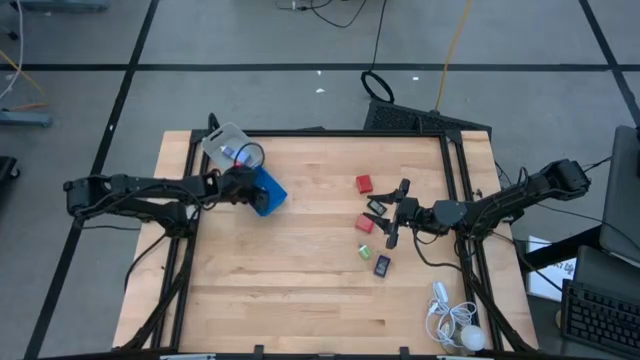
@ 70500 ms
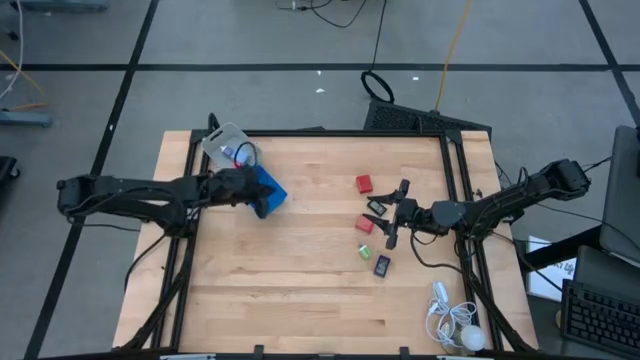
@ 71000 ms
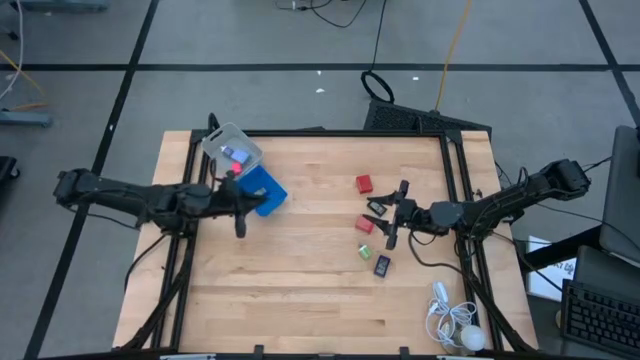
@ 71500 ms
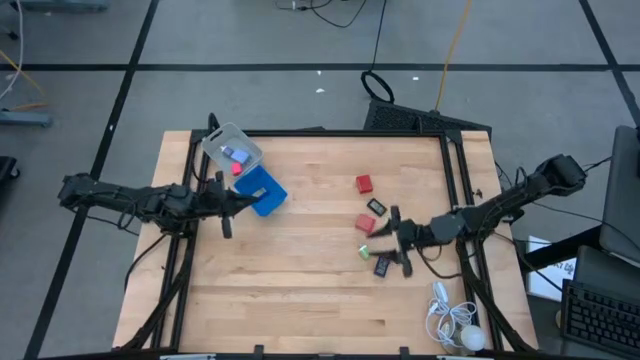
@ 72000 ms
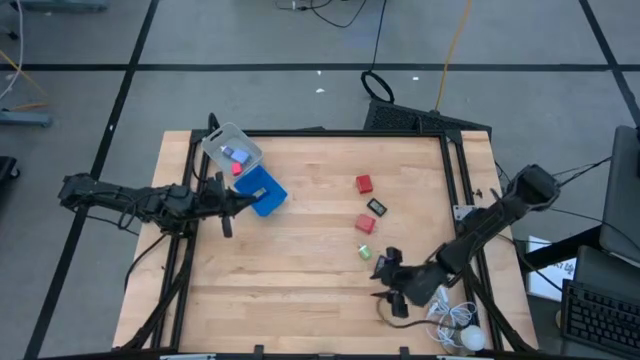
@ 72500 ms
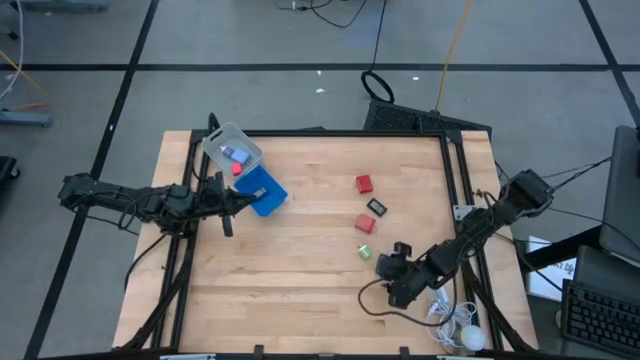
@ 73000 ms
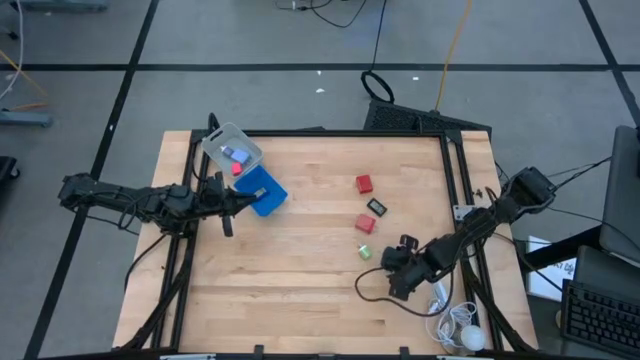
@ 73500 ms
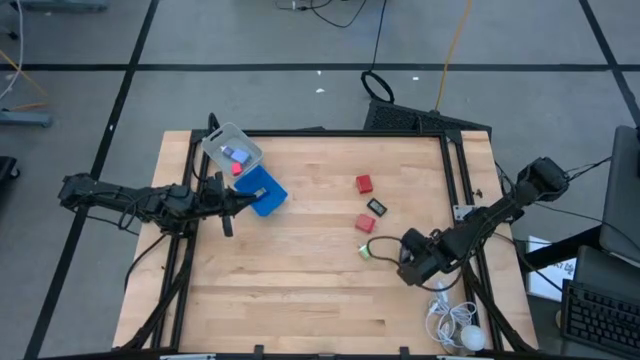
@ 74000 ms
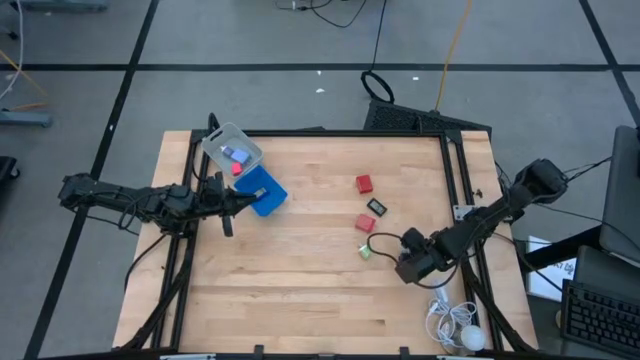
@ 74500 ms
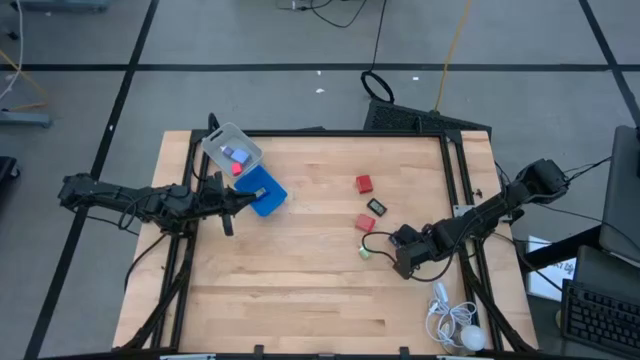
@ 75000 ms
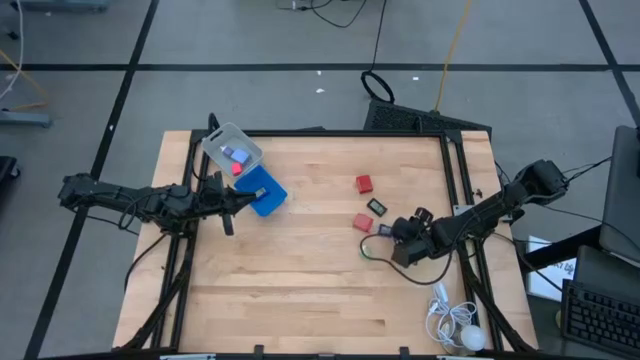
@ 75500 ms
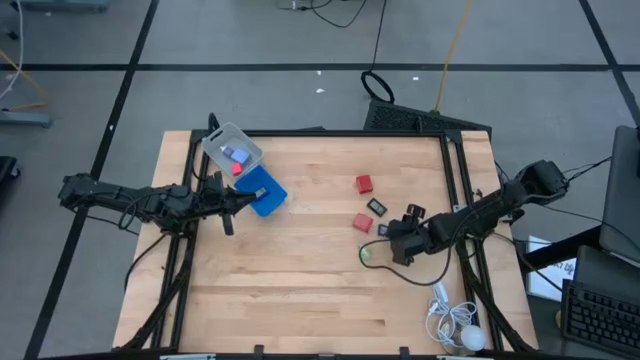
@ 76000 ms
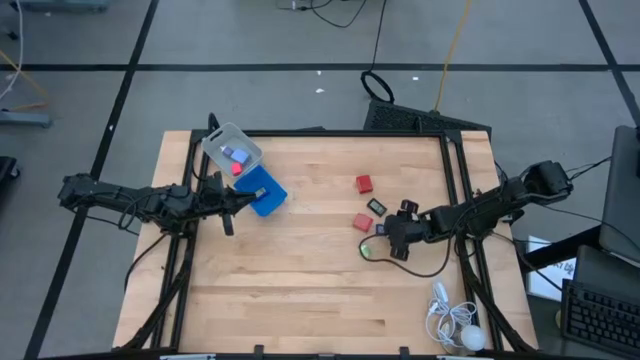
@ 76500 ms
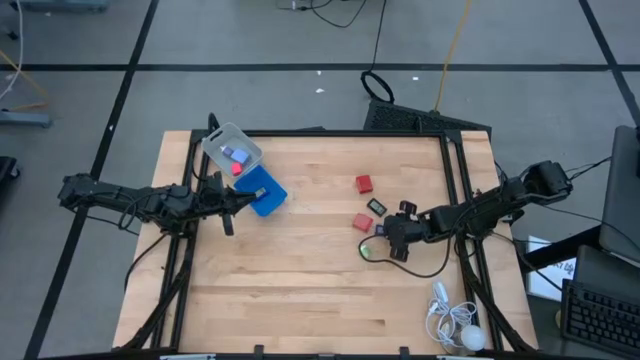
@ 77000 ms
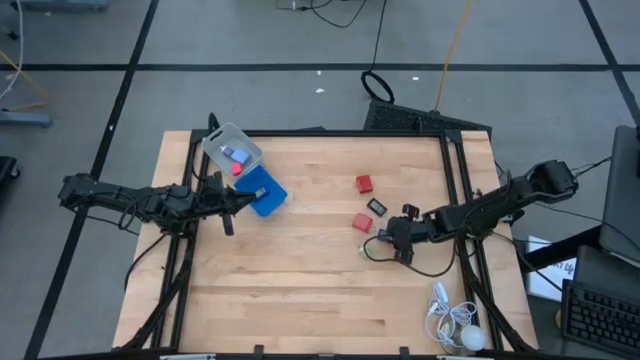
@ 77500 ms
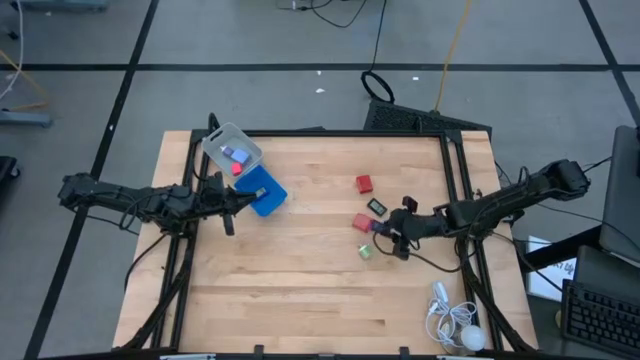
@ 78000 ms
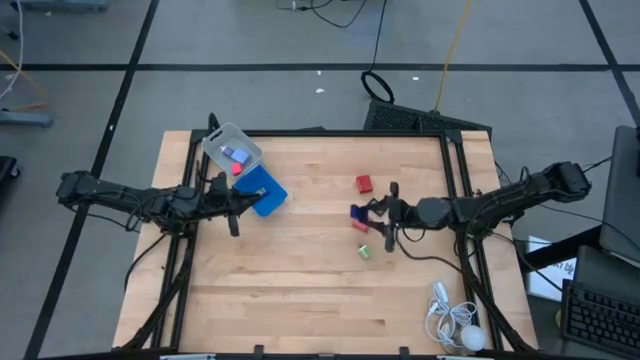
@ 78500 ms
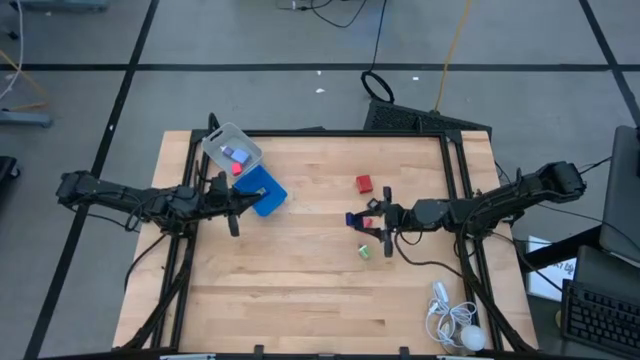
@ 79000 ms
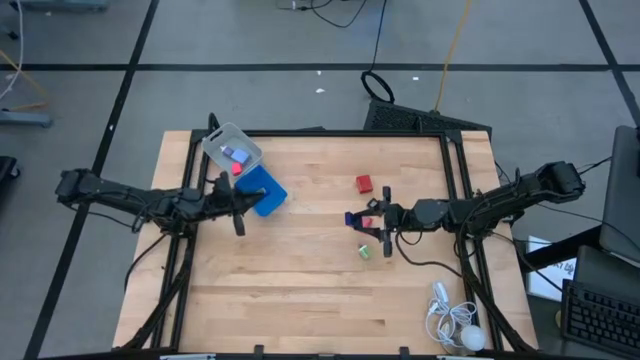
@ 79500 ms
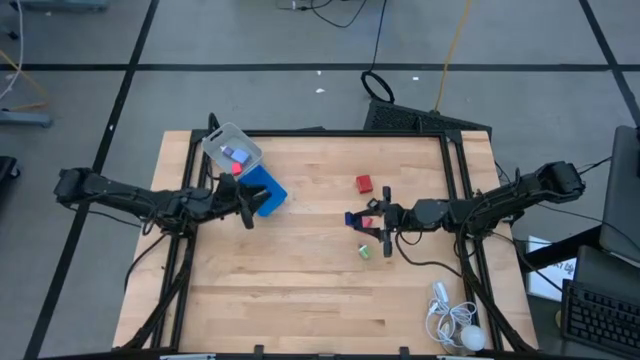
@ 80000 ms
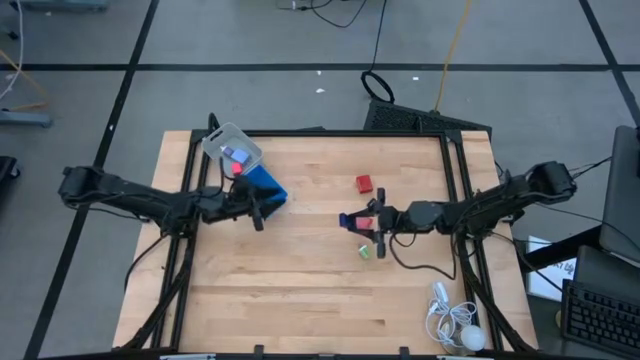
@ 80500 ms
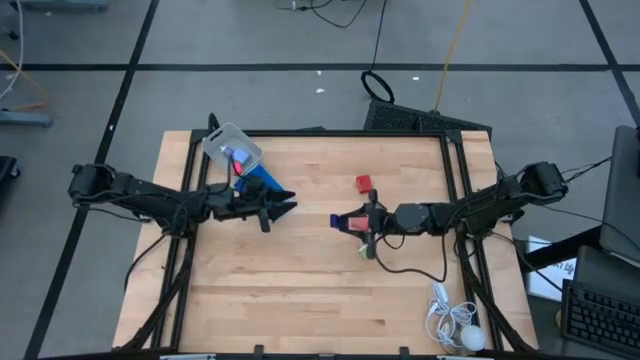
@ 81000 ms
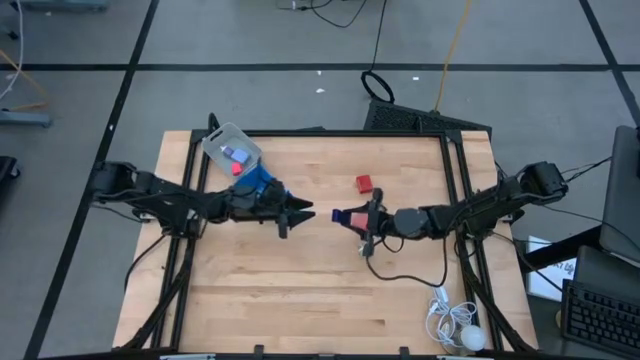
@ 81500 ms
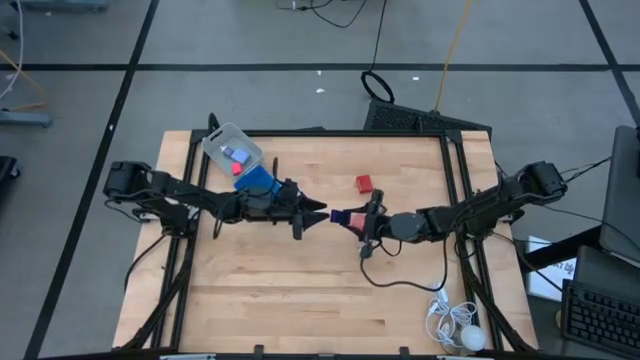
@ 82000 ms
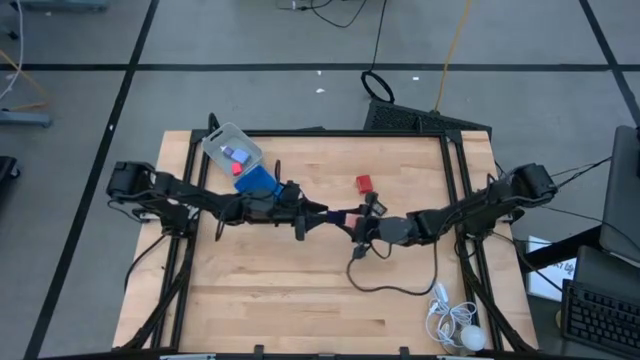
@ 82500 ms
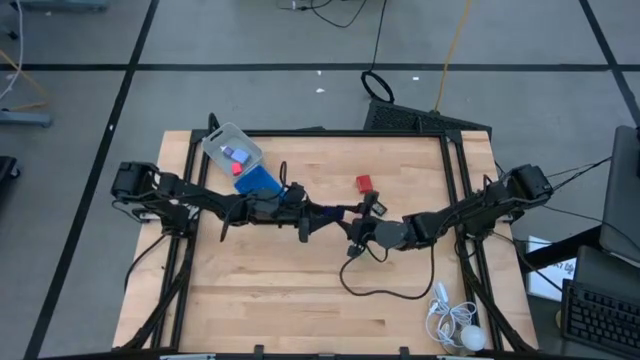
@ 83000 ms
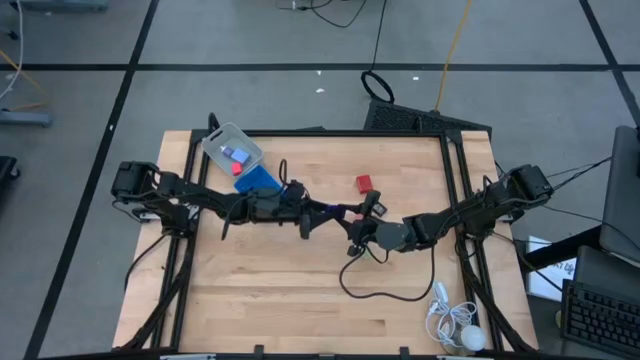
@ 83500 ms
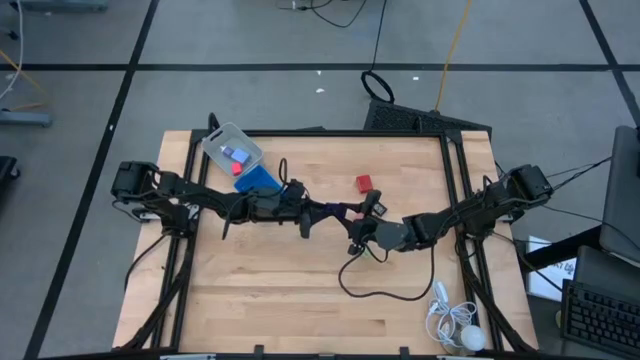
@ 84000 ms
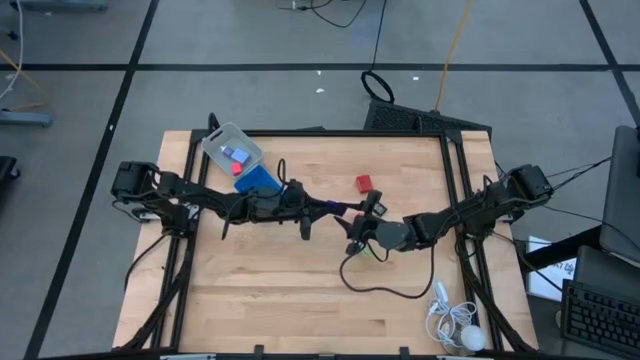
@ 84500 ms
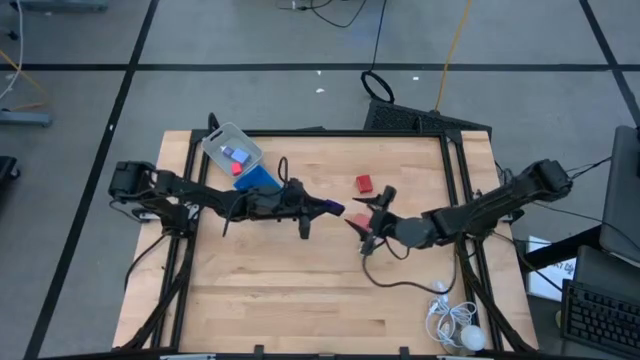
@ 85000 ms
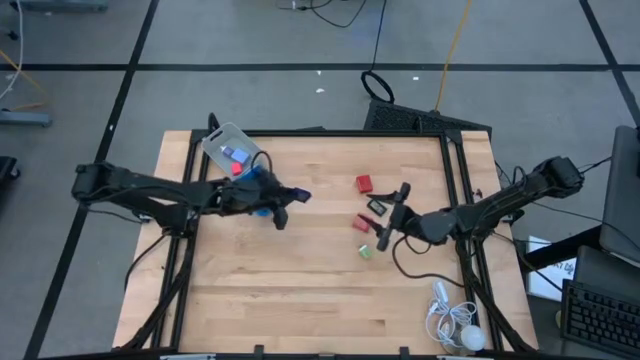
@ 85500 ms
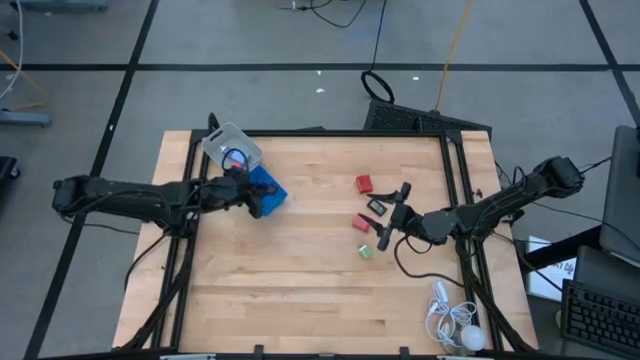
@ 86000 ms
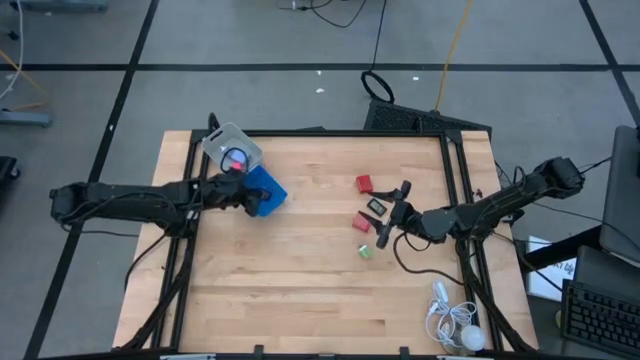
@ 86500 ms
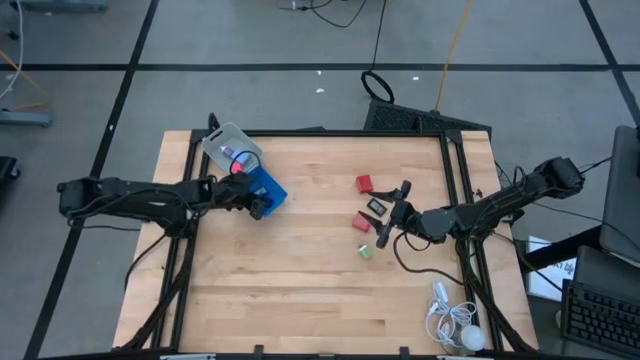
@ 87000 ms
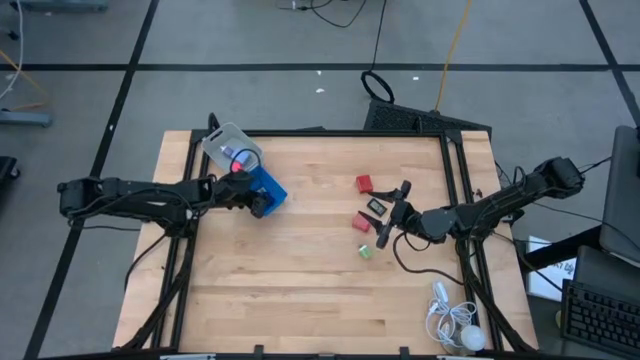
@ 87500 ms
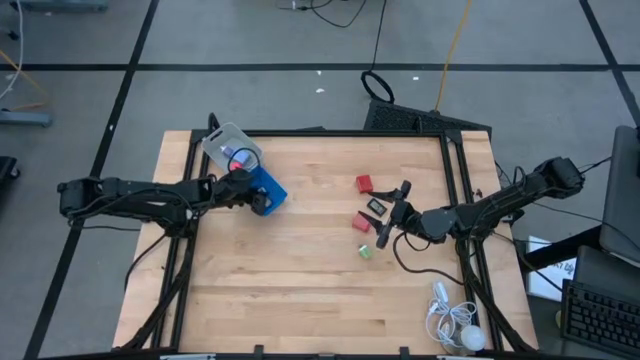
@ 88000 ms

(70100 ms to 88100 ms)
Task: Pick & Place Office items
Put the dark blue digital timer into the blue bin
